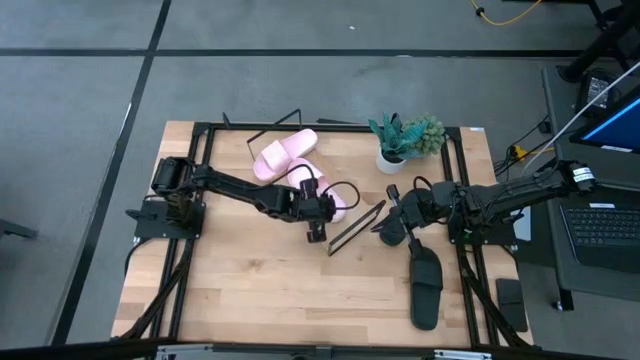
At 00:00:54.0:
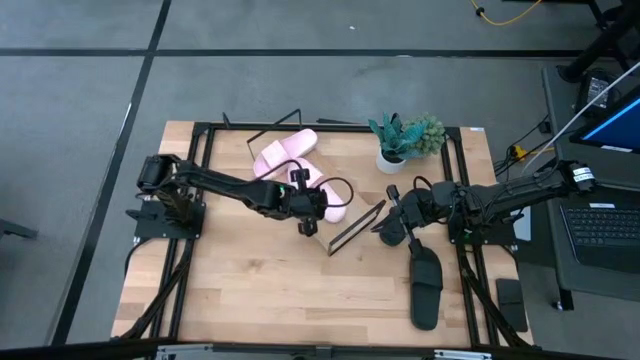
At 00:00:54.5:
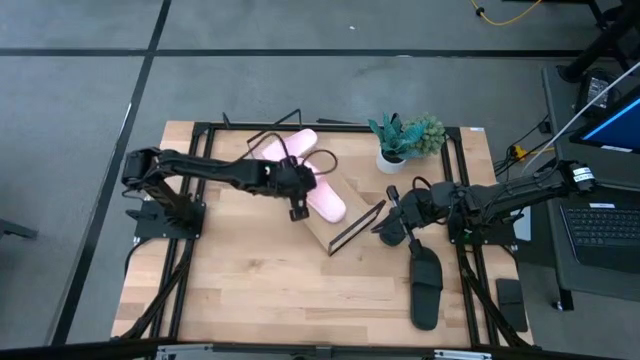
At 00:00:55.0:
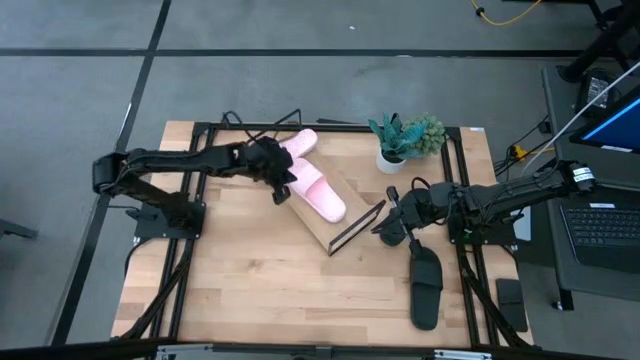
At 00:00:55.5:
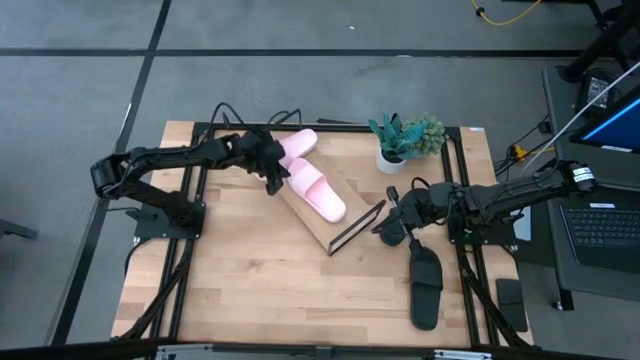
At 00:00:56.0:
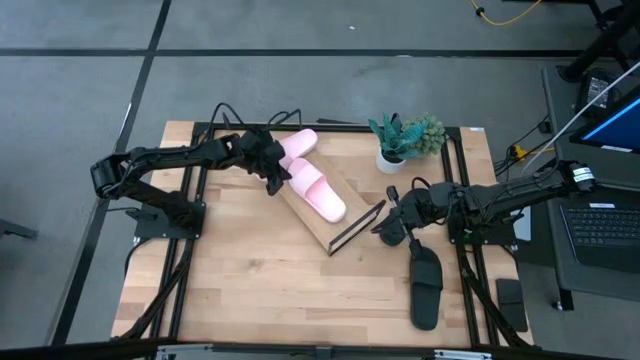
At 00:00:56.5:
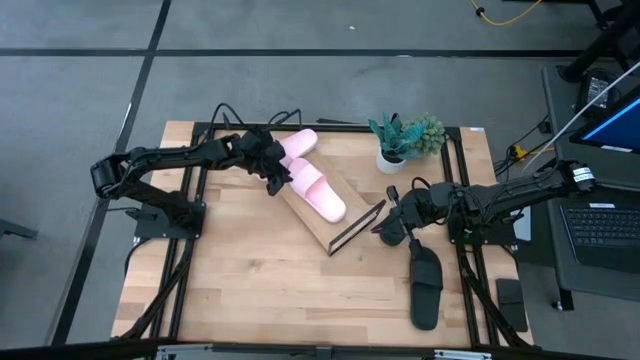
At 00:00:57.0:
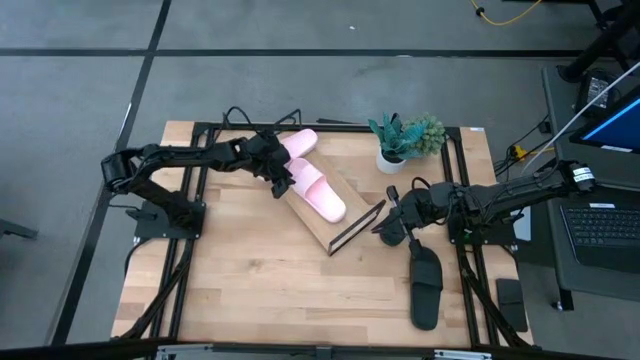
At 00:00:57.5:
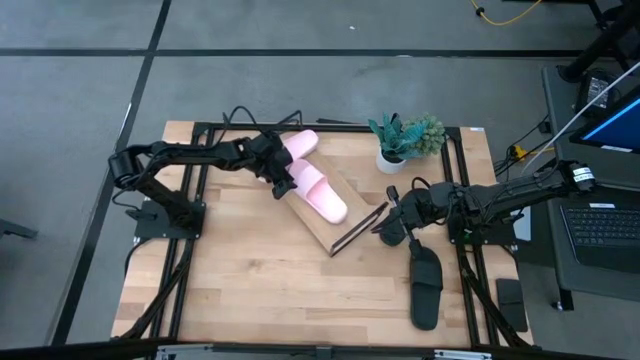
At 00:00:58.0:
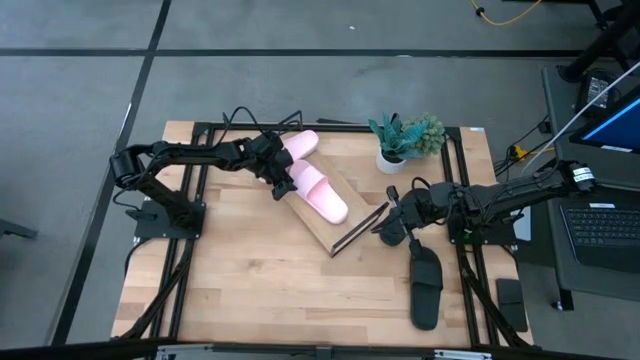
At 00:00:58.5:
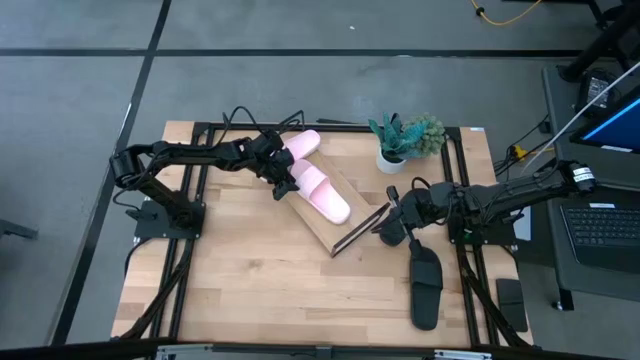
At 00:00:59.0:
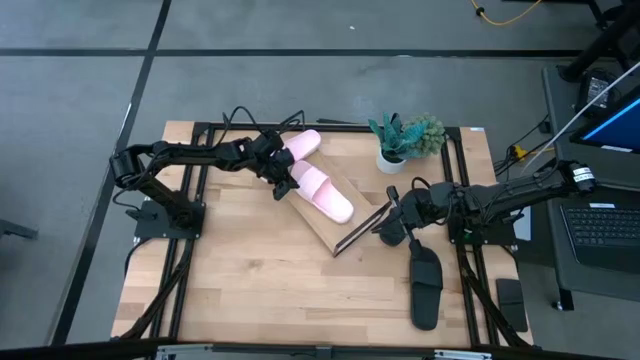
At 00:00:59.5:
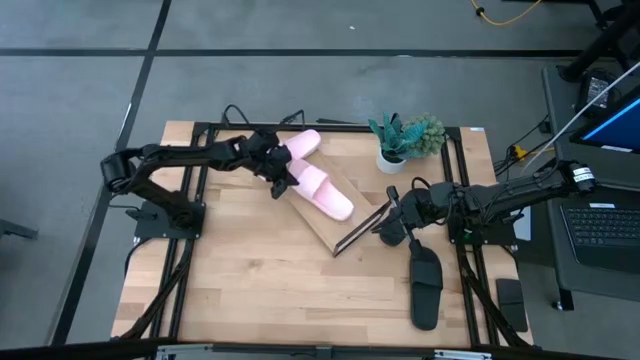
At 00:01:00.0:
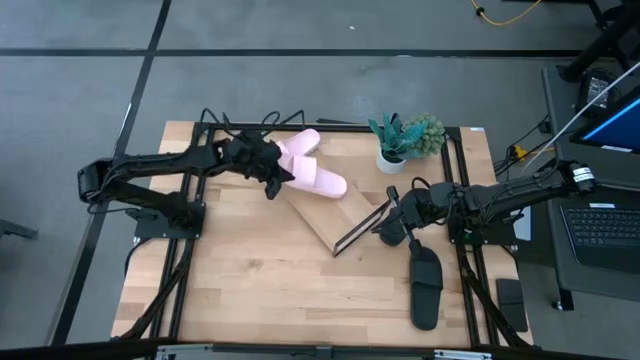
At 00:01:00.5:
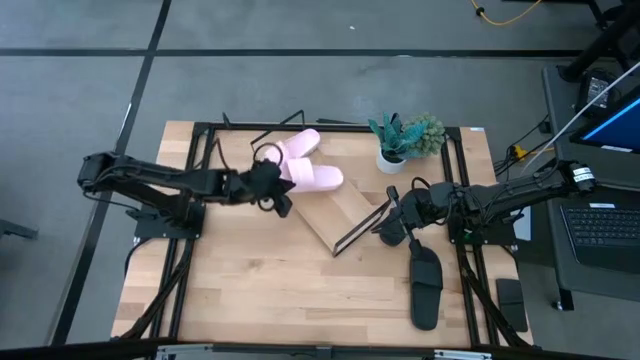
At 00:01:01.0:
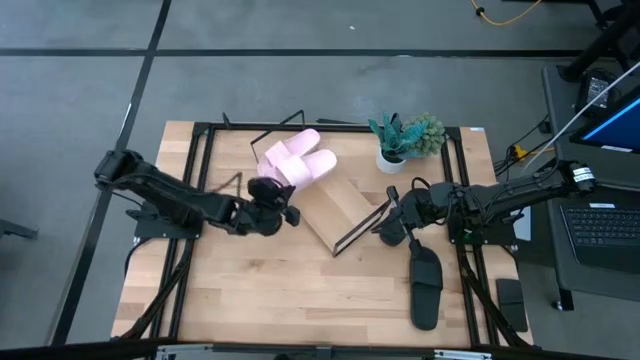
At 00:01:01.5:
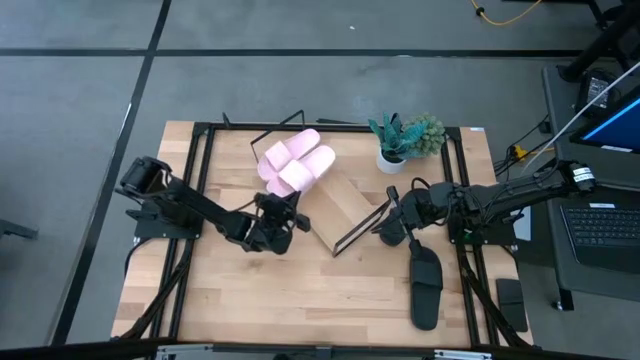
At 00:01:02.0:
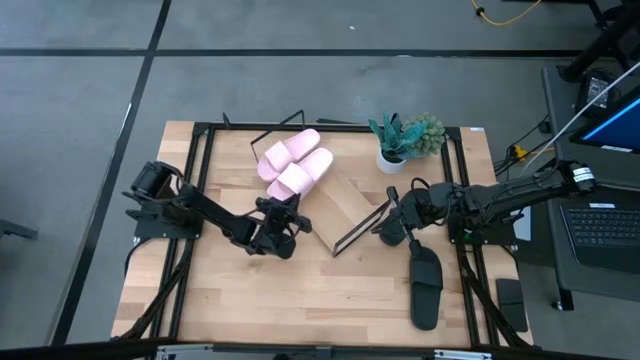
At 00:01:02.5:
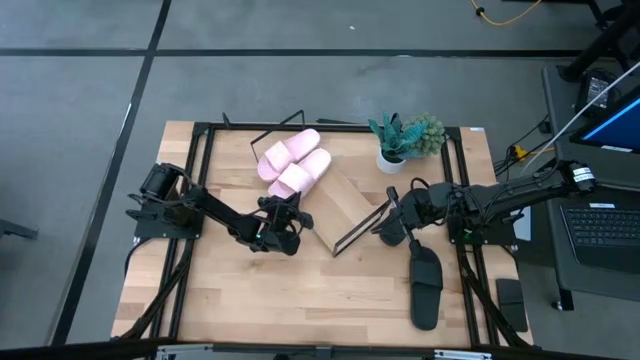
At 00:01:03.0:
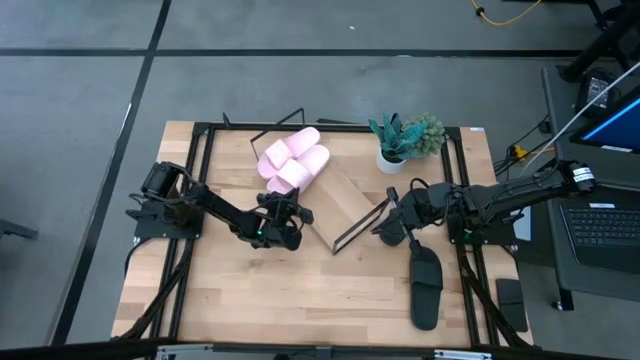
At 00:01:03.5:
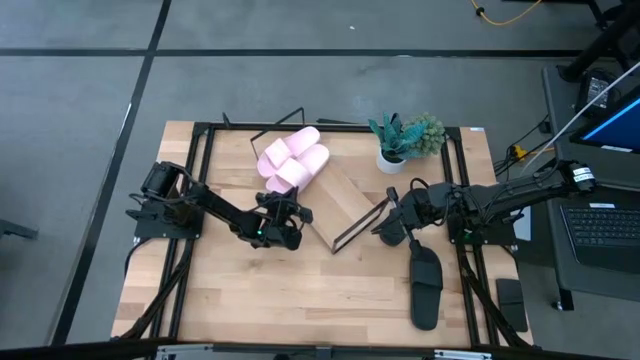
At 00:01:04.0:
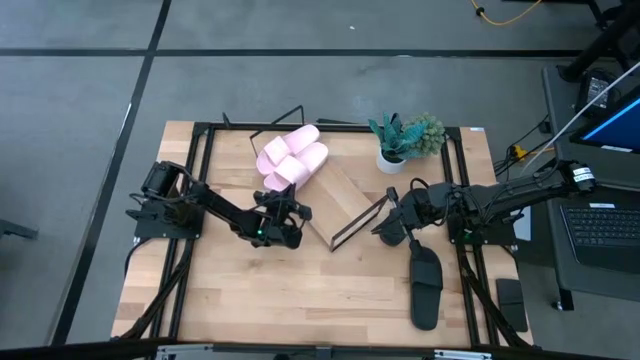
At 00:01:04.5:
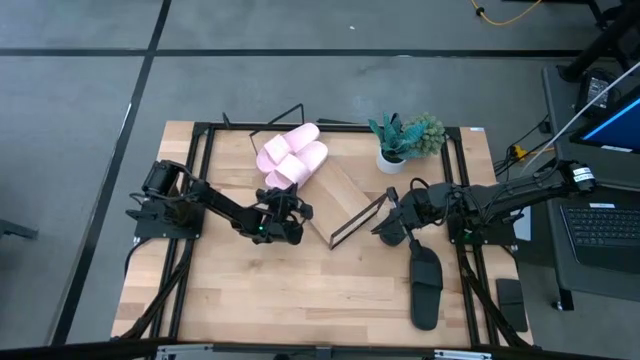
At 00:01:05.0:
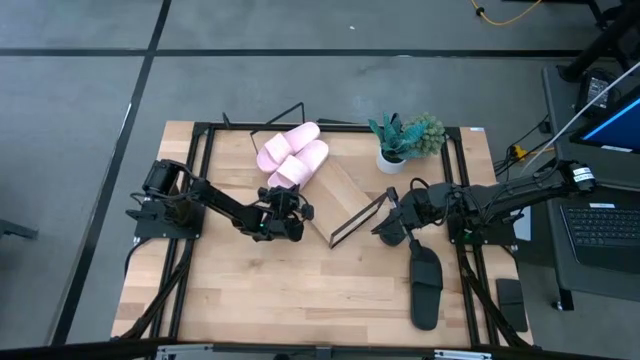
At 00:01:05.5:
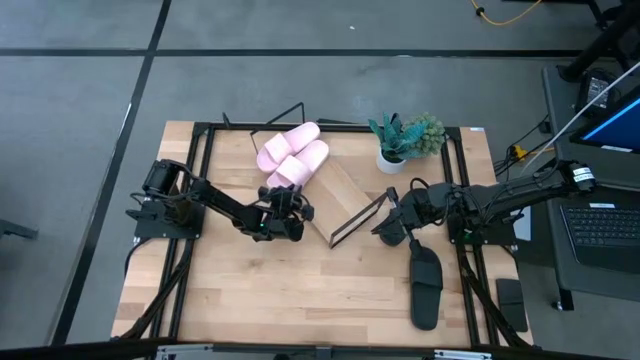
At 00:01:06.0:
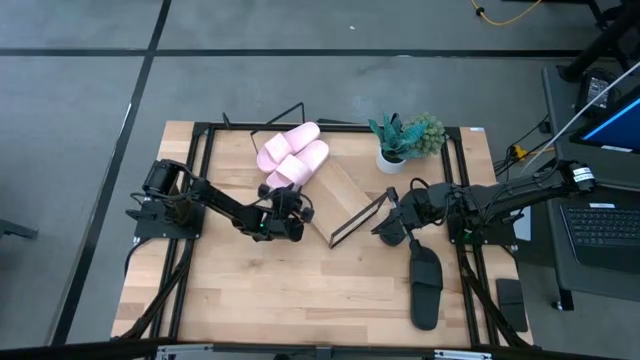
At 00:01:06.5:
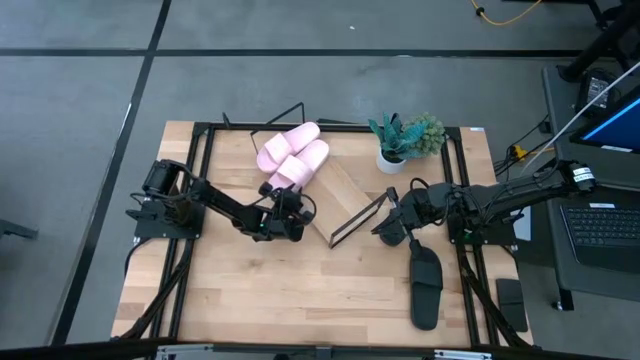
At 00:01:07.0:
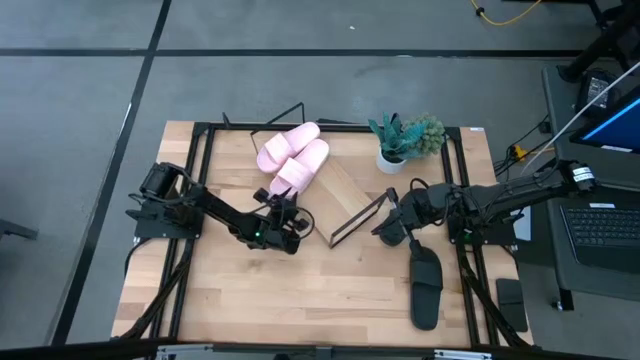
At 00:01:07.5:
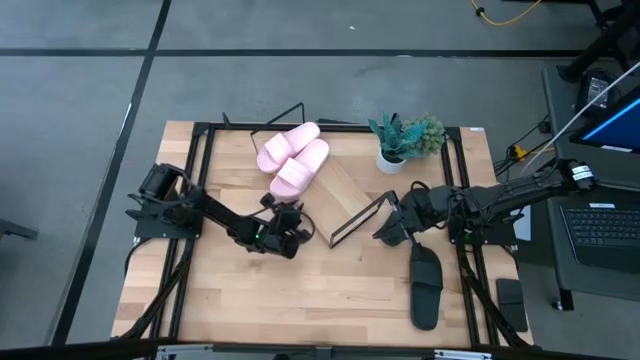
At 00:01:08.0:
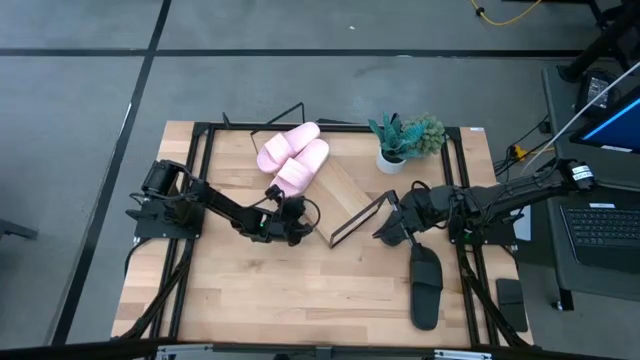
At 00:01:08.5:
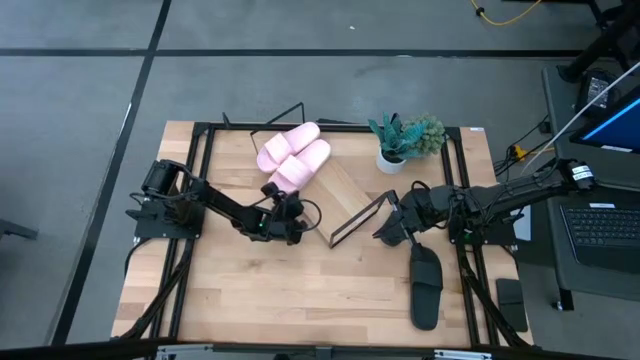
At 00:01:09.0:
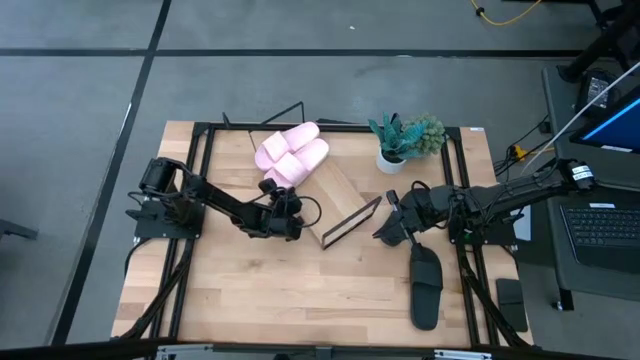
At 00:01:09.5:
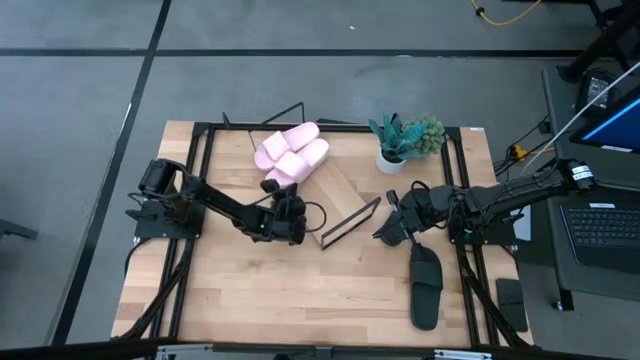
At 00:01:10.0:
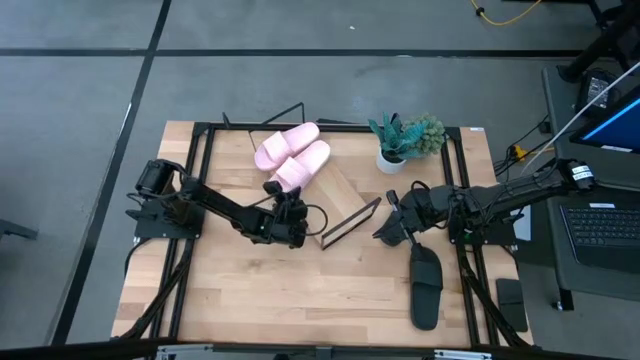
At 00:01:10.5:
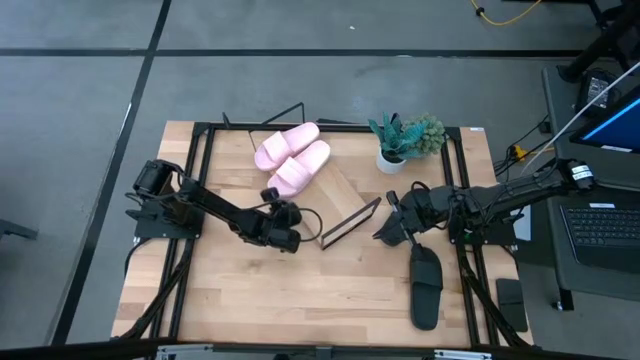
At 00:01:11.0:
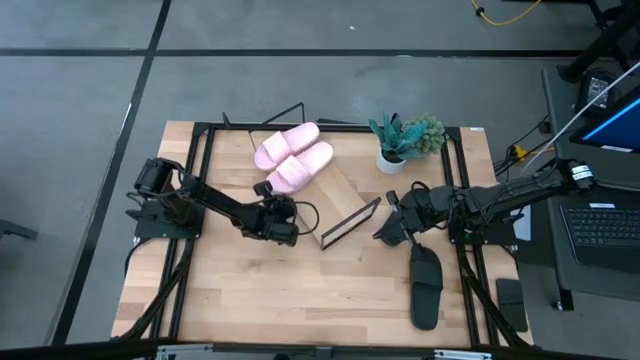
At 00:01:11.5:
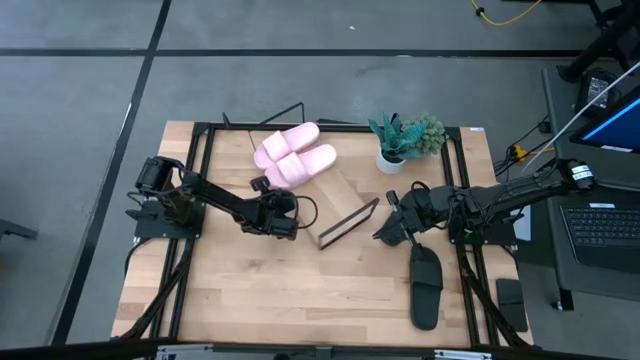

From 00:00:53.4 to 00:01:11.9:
Task: Pick and place slides into the shelf
Adjust the right pink slides on the shelf
